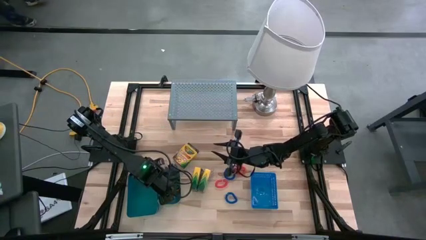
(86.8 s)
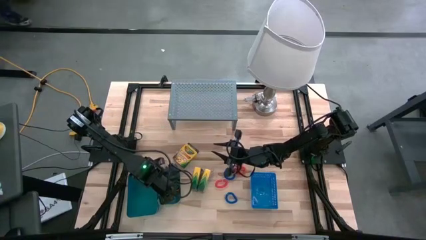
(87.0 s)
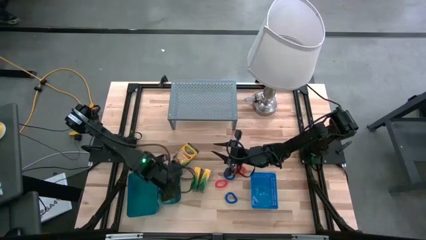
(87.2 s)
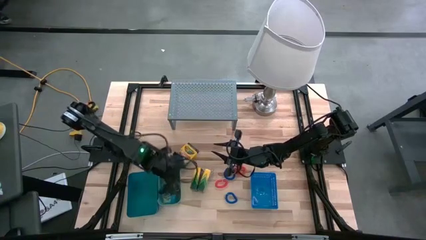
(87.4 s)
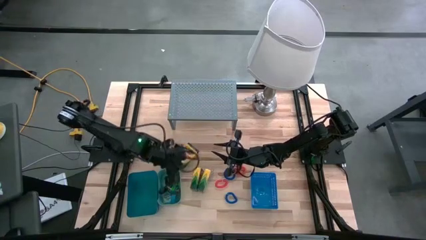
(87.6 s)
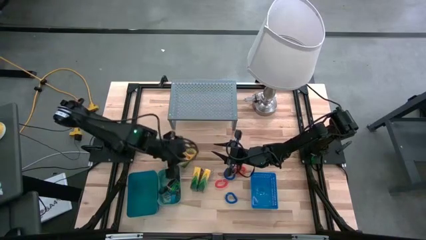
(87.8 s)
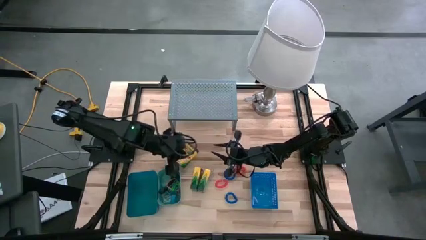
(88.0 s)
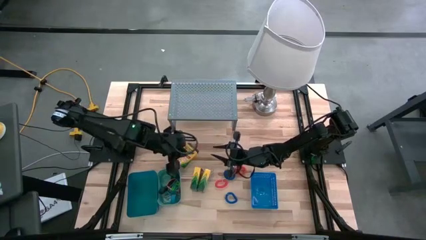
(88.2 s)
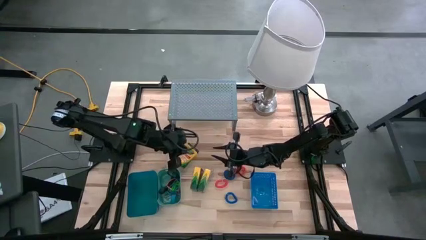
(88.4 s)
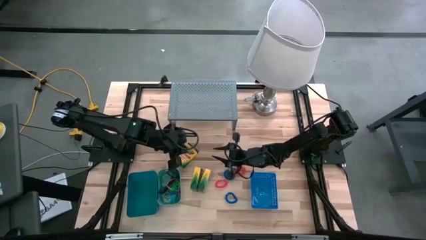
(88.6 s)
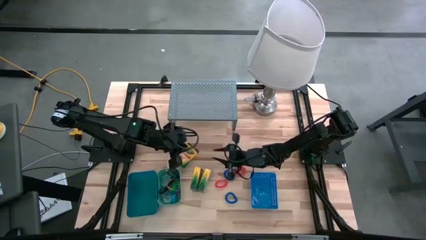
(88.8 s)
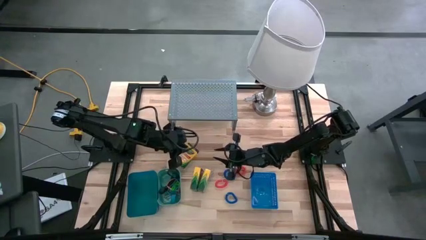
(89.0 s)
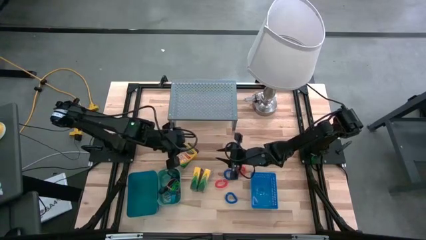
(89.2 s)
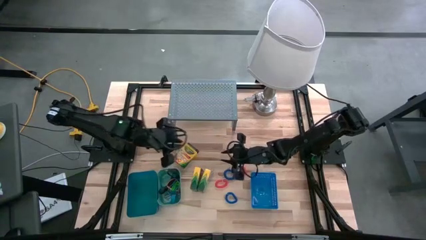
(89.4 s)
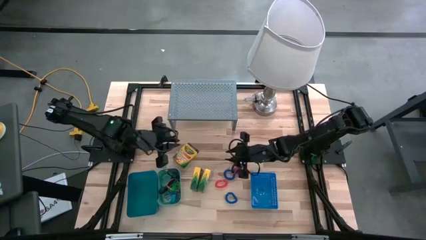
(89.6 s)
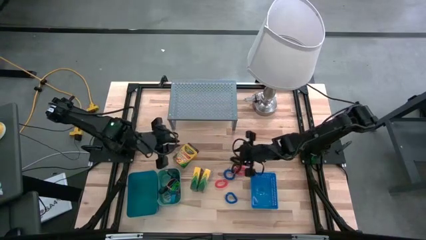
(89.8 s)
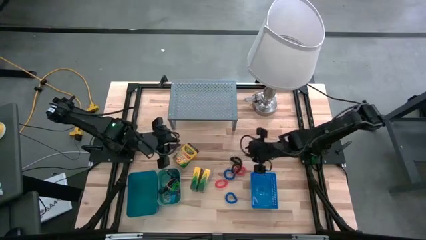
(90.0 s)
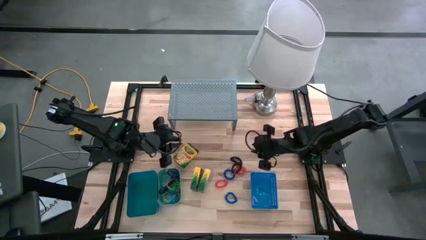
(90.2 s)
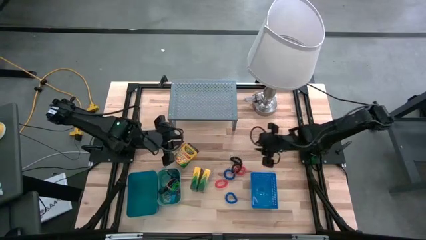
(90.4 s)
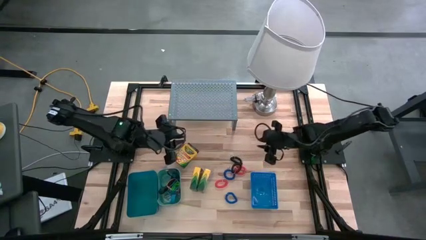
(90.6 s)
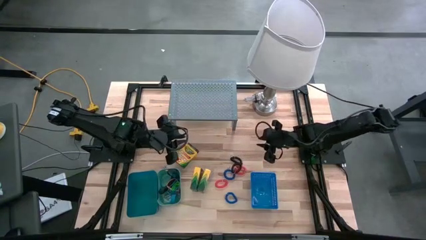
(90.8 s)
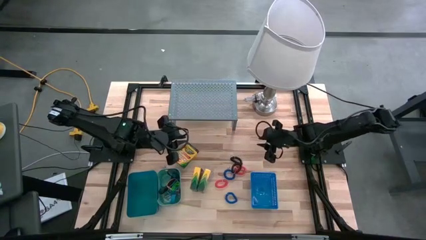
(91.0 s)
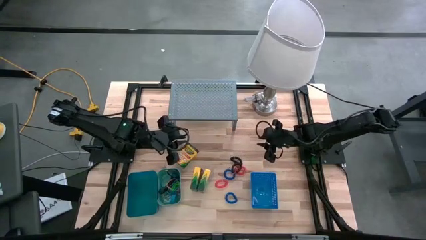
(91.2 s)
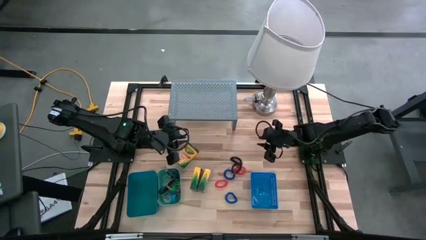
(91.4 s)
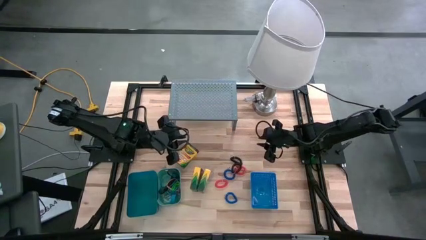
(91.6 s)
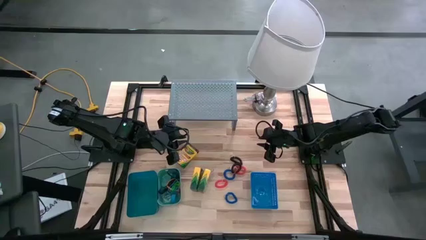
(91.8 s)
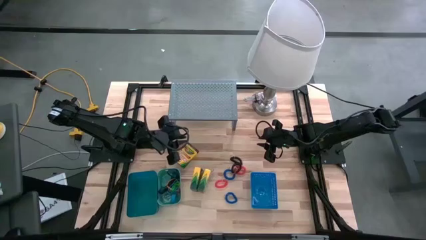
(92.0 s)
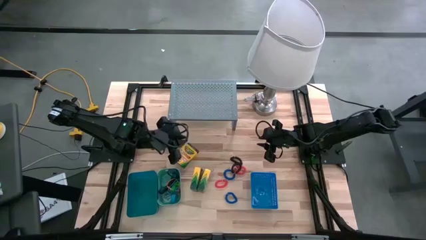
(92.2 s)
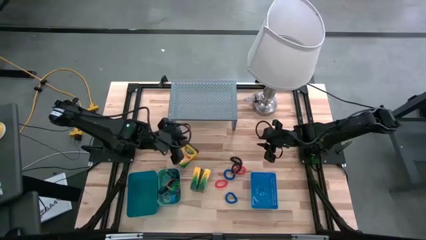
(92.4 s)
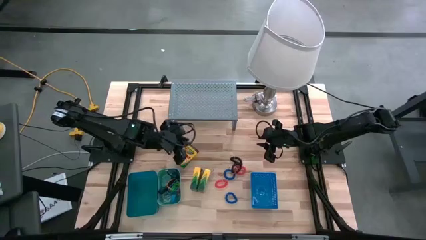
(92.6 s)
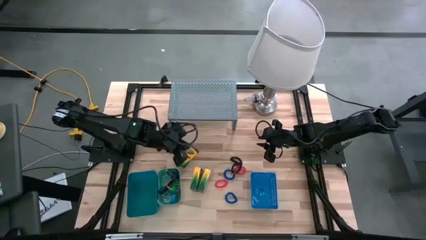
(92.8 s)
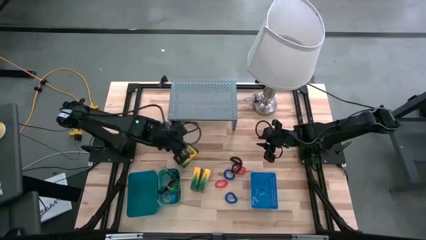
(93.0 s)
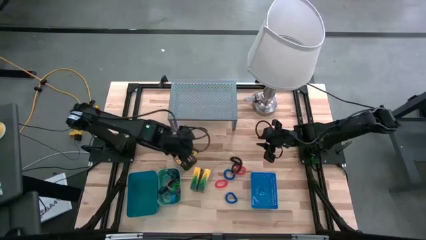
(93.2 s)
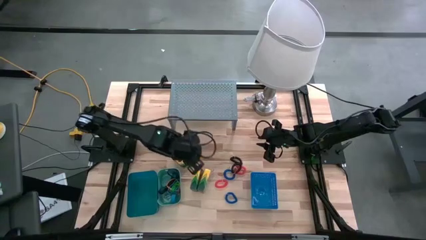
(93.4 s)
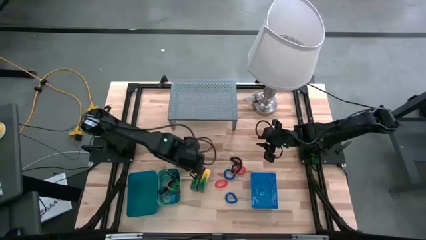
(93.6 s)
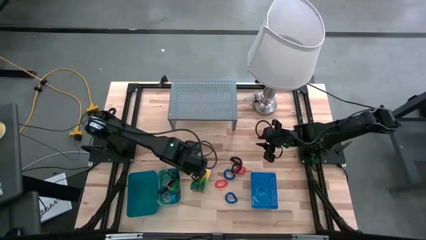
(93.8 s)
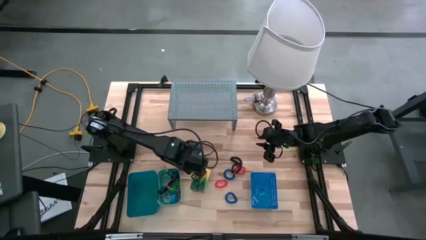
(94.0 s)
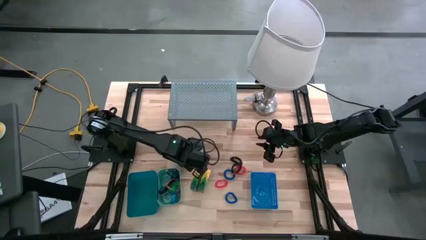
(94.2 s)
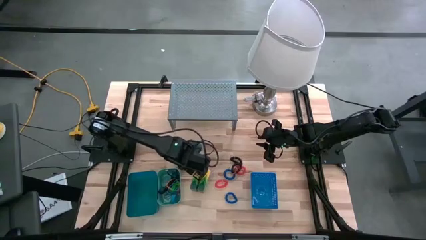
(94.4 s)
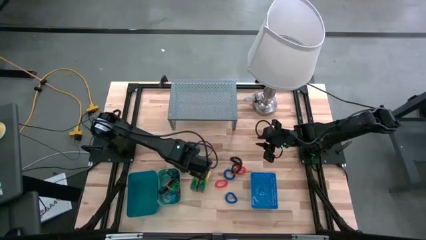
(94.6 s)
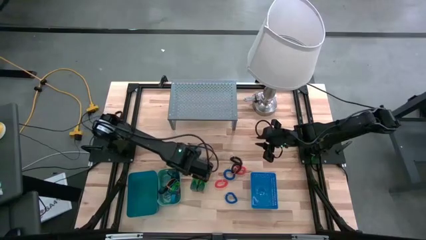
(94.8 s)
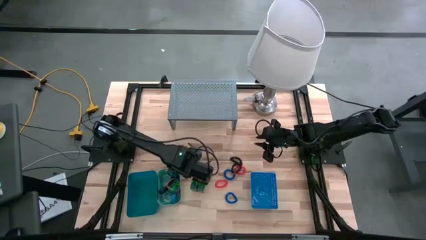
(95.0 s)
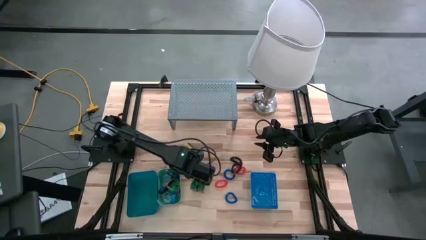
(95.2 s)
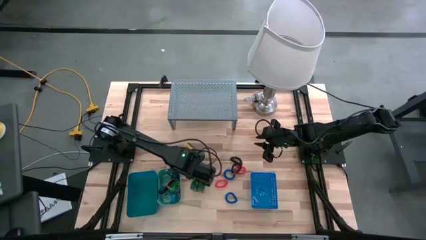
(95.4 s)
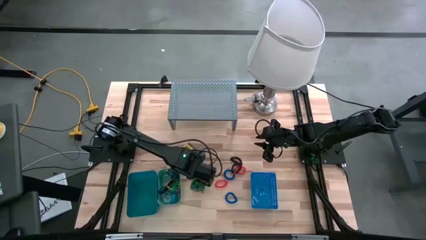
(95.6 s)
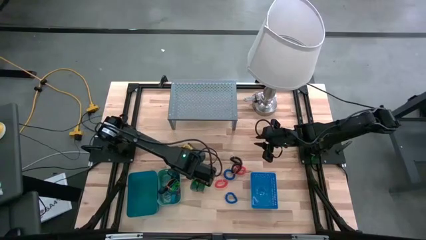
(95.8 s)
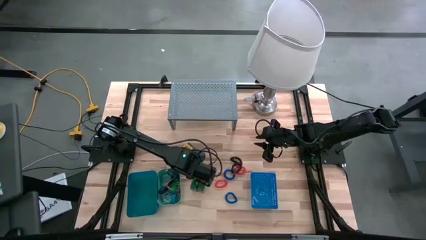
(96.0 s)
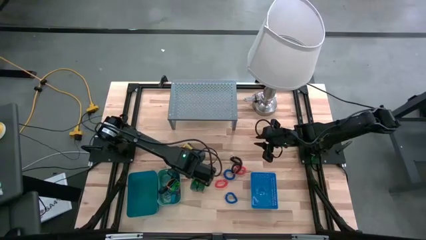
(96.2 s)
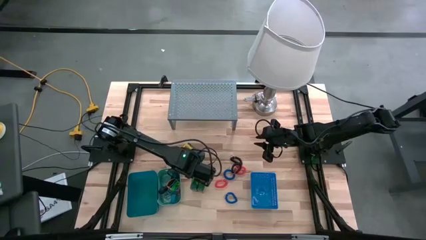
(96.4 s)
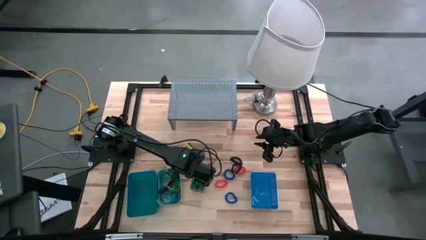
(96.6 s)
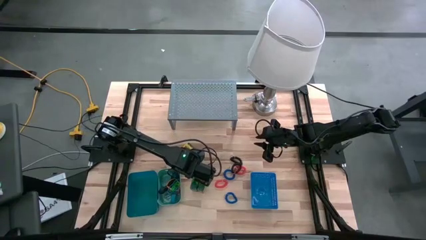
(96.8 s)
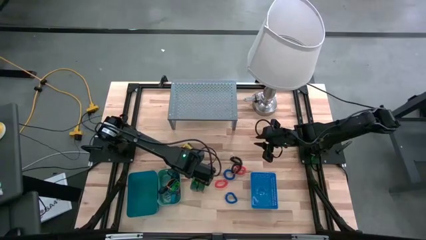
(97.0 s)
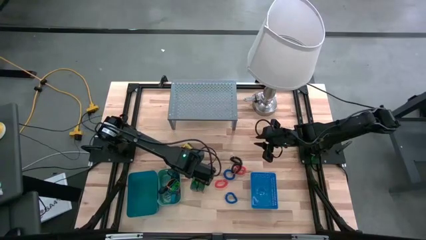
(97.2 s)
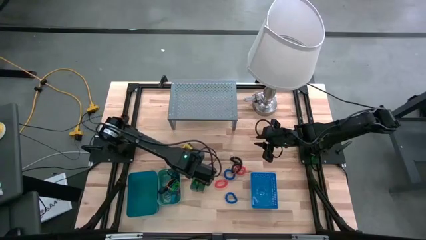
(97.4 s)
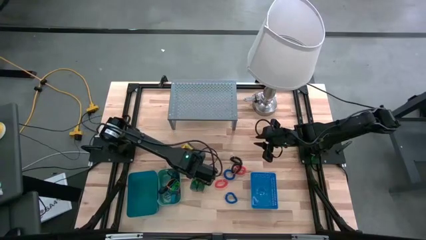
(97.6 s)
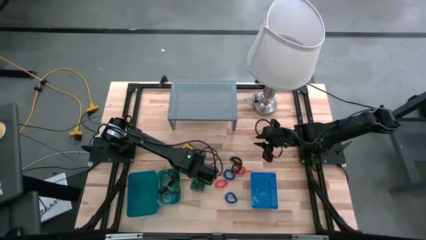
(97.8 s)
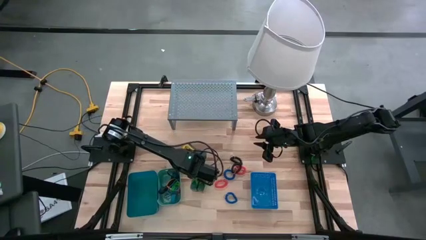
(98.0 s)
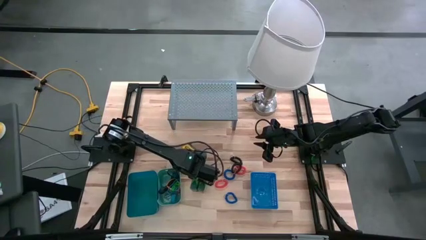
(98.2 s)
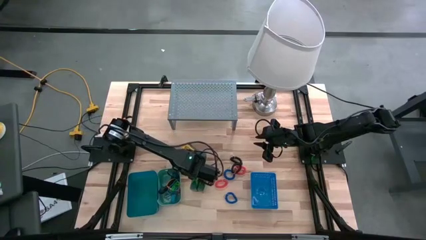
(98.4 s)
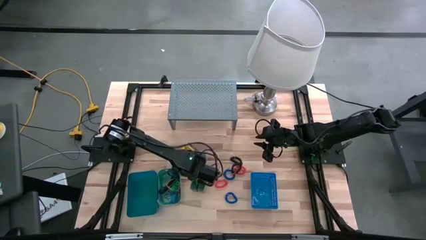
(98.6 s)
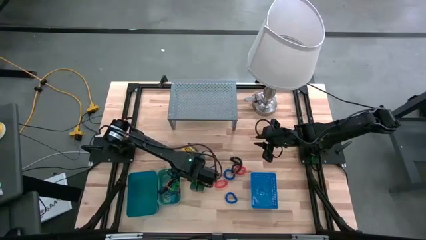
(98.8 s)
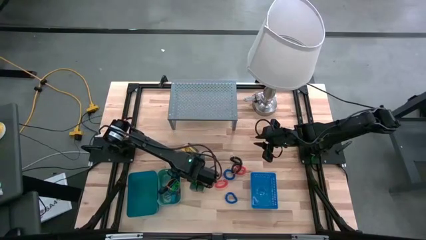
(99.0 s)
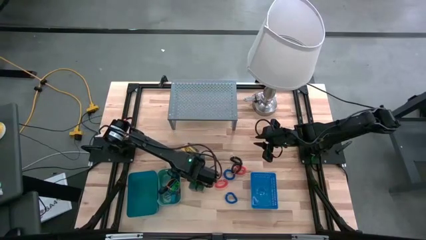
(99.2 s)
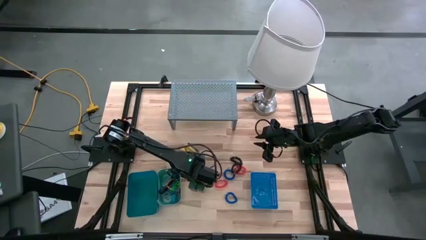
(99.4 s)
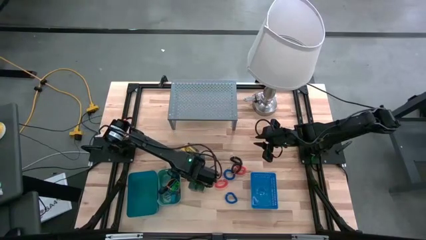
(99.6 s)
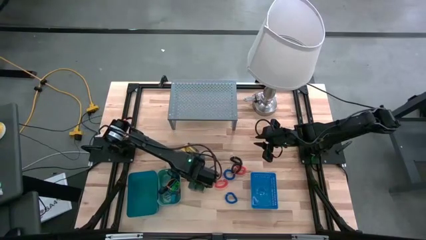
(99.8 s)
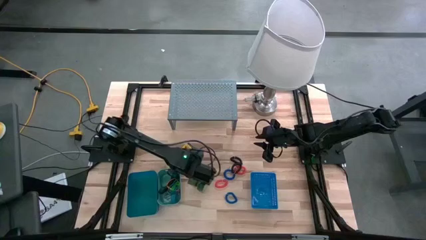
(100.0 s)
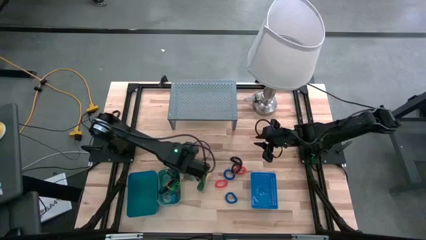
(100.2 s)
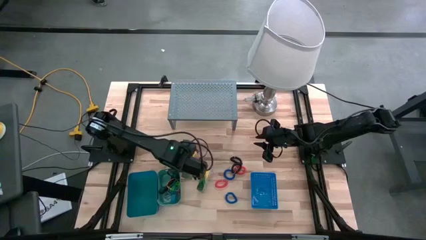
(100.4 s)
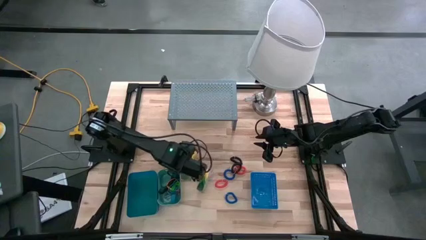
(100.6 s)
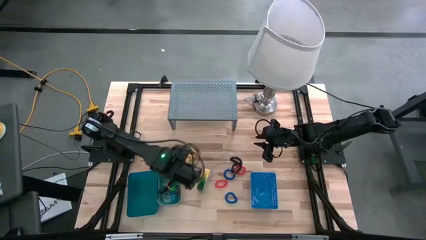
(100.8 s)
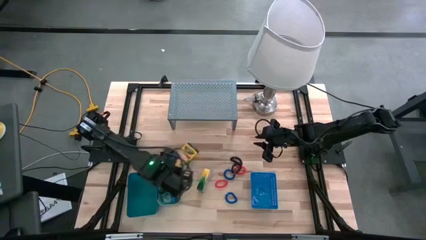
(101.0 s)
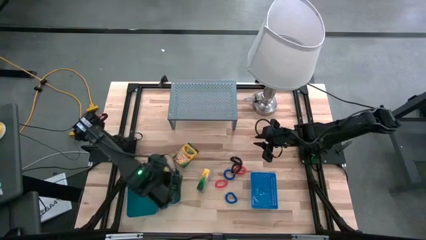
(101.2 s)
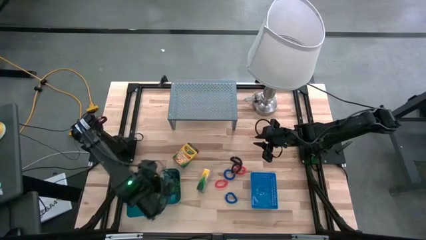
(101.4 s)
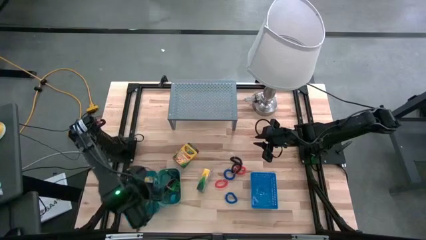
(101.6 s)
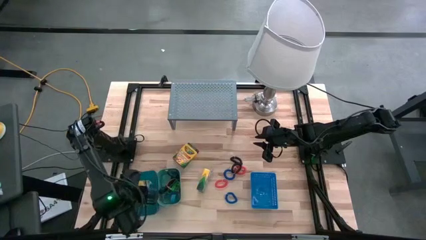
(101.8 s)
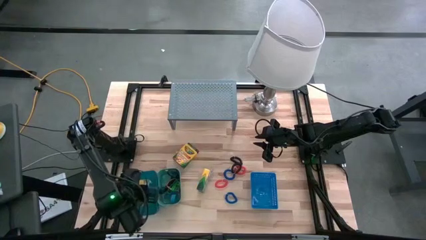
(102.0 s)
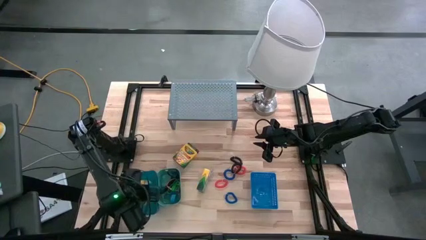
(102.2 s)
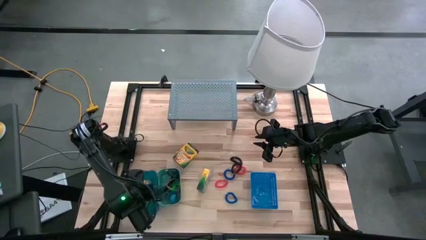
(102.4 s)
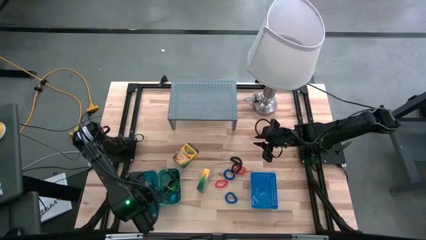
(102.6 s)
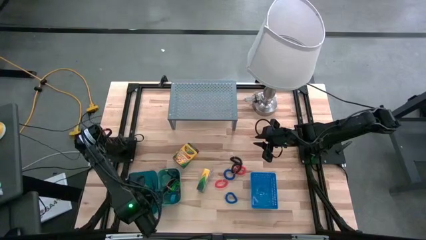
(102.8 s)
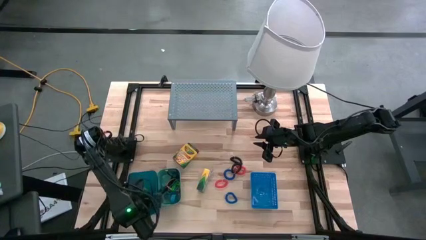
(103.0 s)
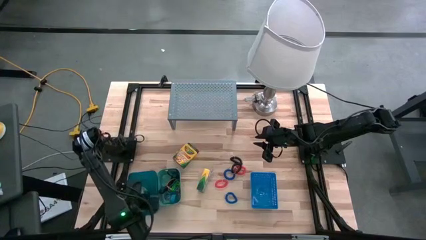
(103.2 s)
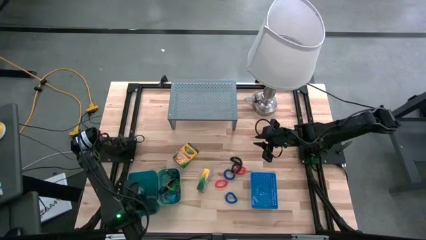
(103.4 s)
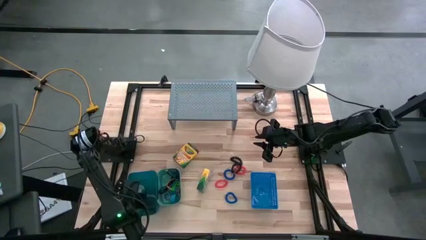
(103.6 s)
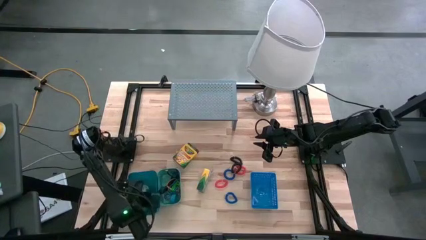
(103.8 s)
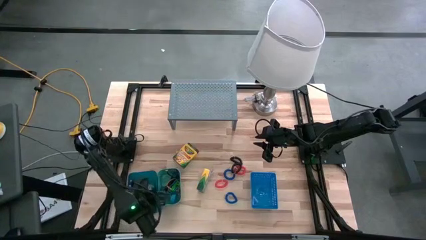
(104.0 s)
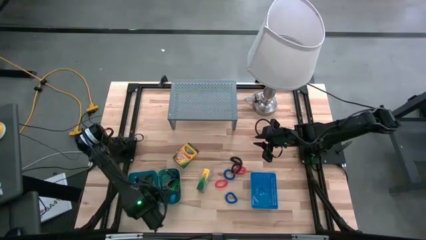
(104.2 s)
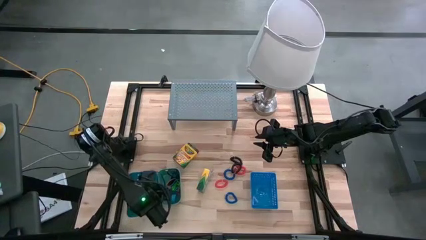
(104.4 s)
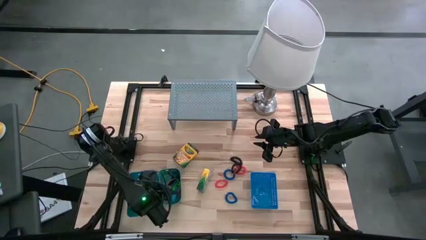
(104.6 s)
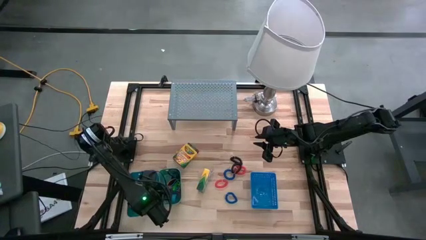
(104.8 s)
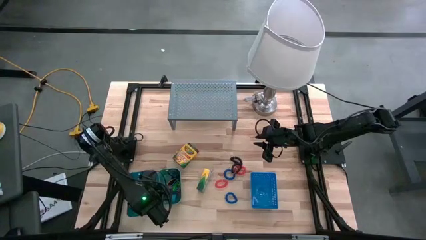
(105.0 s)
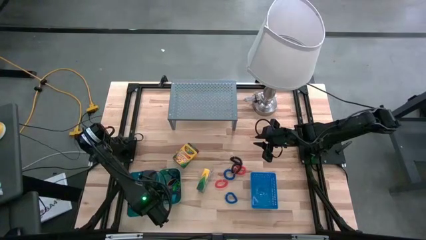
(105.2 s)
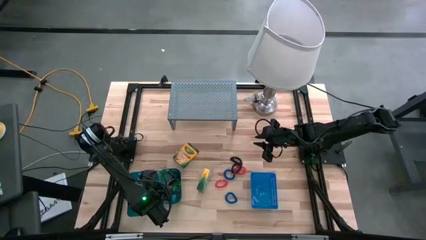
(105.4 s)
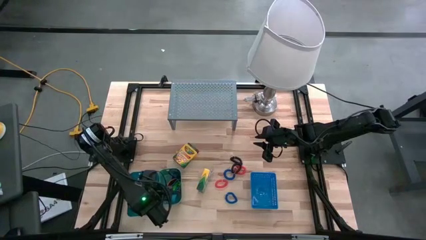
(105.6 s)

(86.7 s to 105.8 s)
Task: Pick & Place Office Desk Supplies
Put the bottom left box of crayons into the light blue bin
